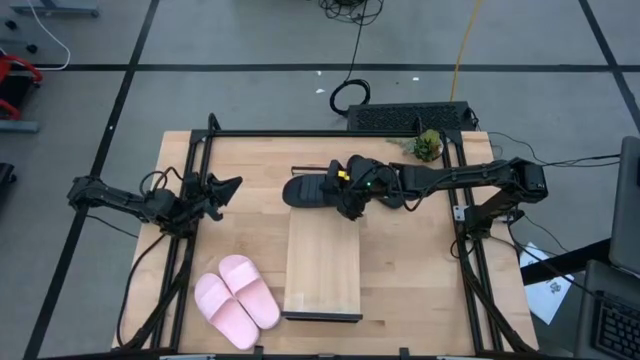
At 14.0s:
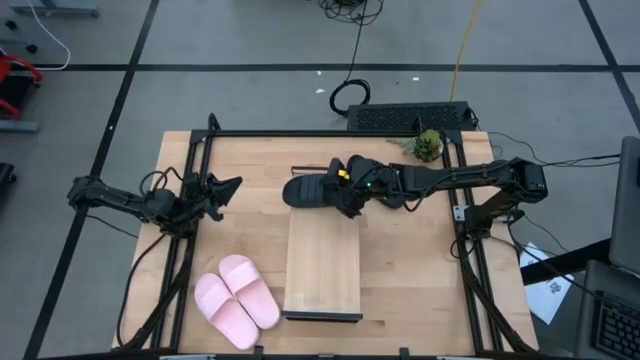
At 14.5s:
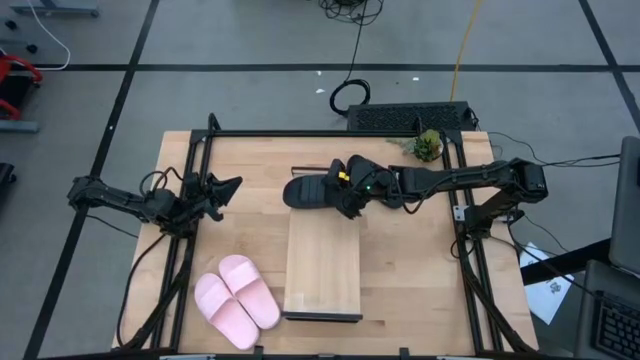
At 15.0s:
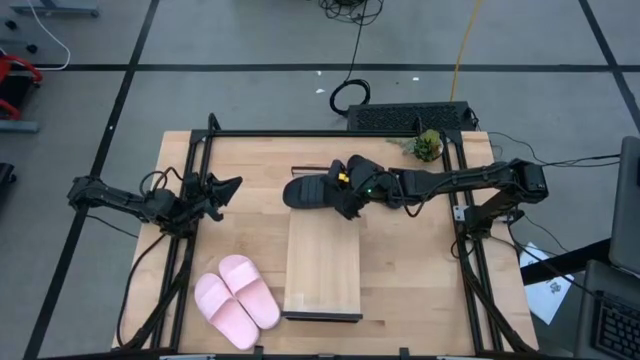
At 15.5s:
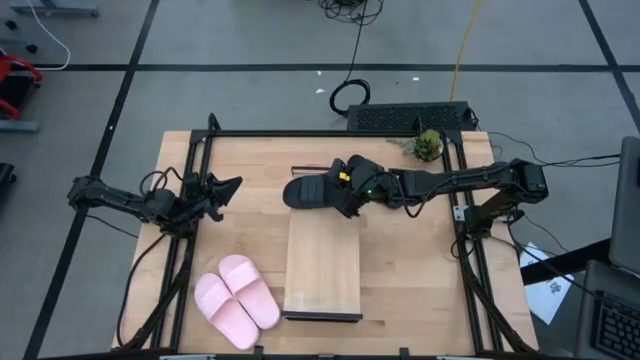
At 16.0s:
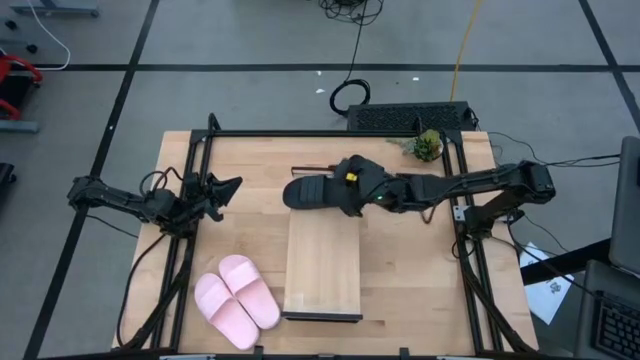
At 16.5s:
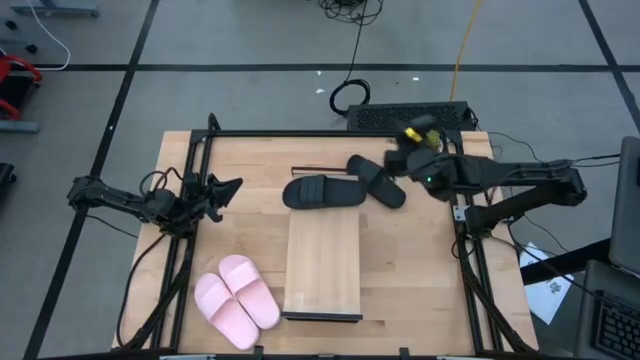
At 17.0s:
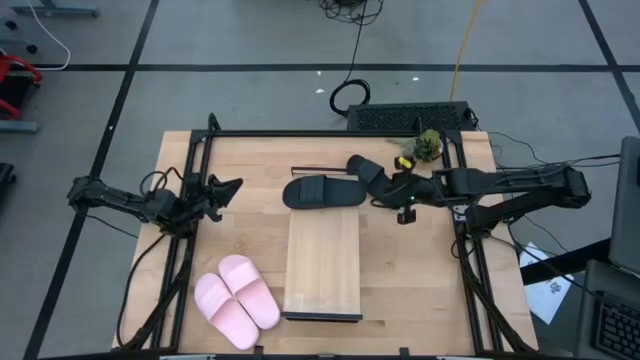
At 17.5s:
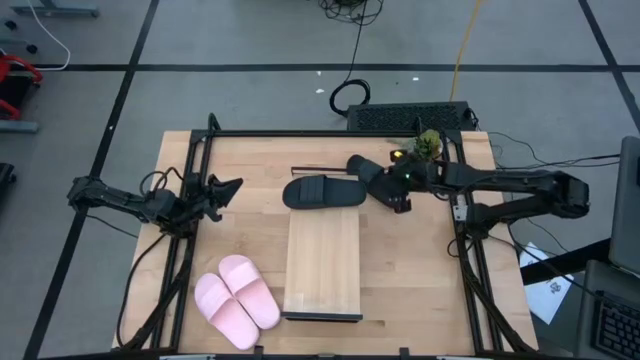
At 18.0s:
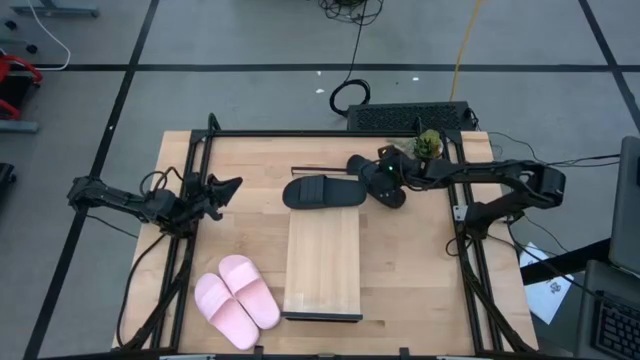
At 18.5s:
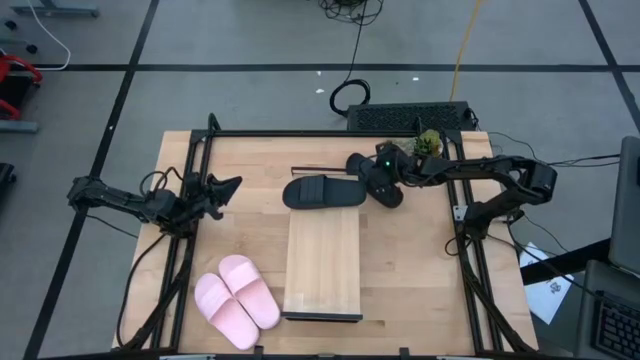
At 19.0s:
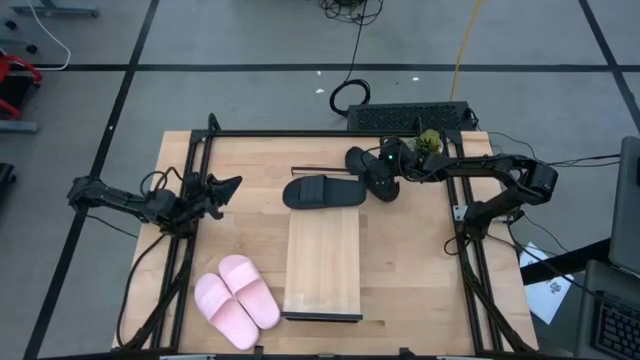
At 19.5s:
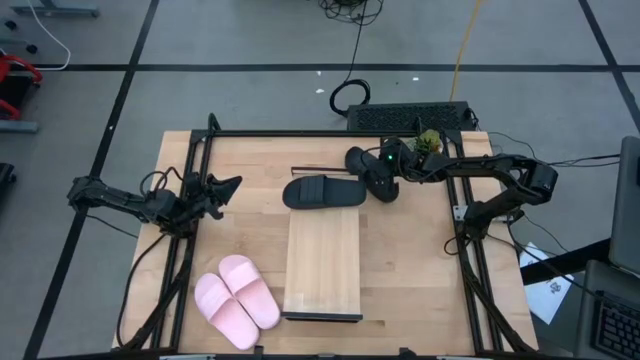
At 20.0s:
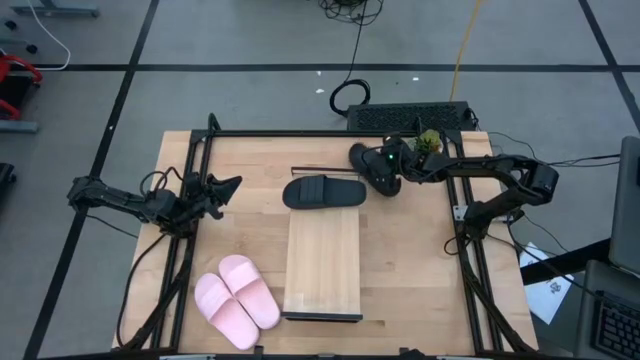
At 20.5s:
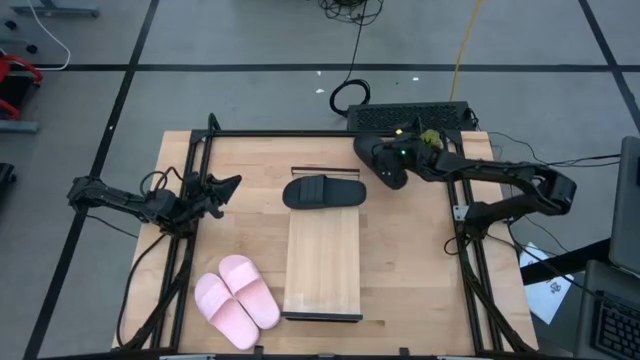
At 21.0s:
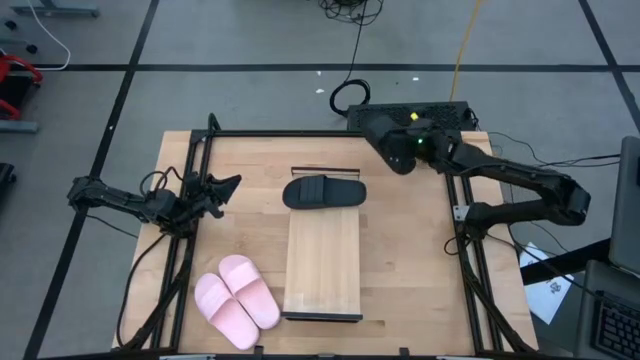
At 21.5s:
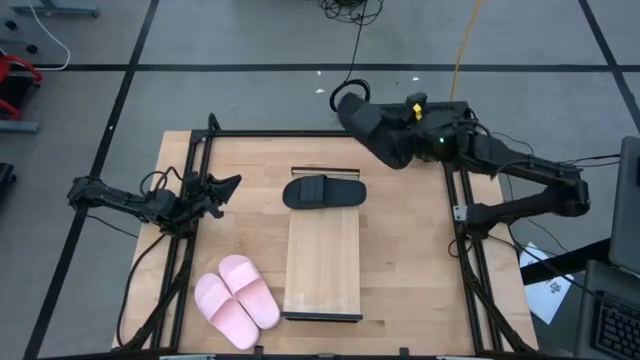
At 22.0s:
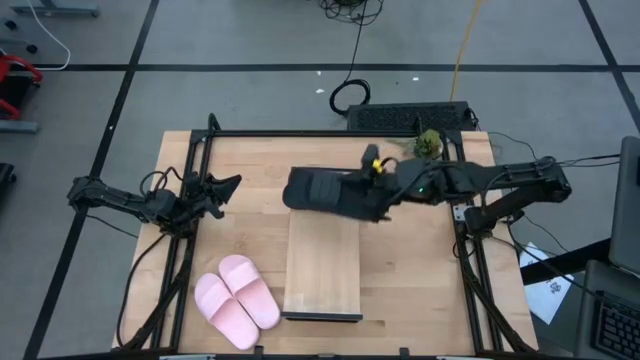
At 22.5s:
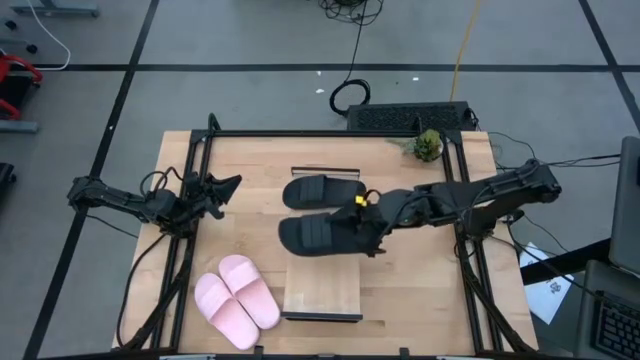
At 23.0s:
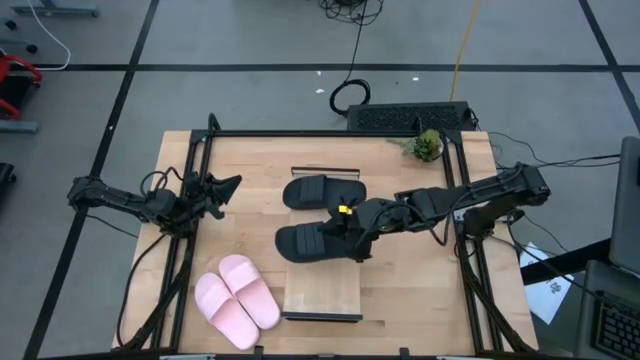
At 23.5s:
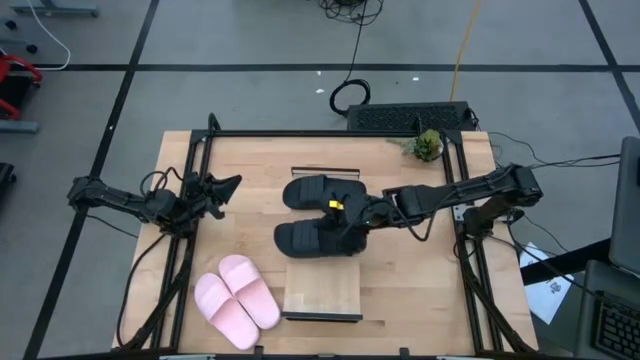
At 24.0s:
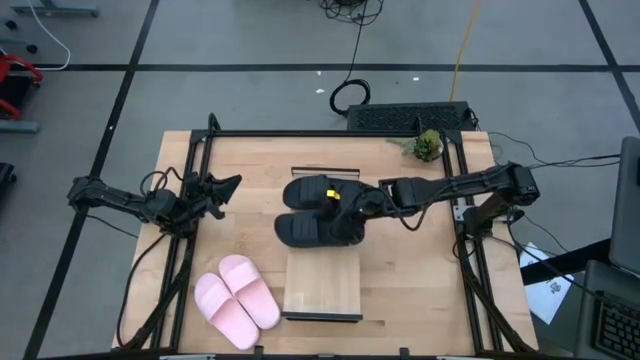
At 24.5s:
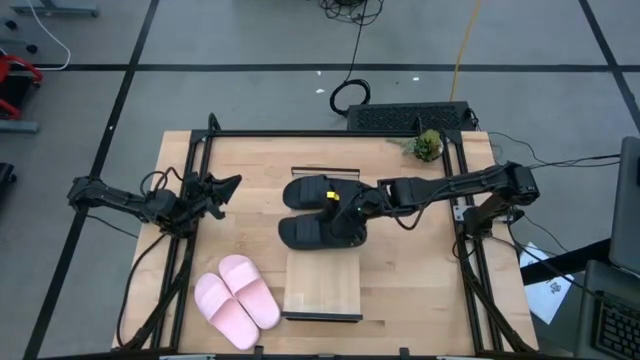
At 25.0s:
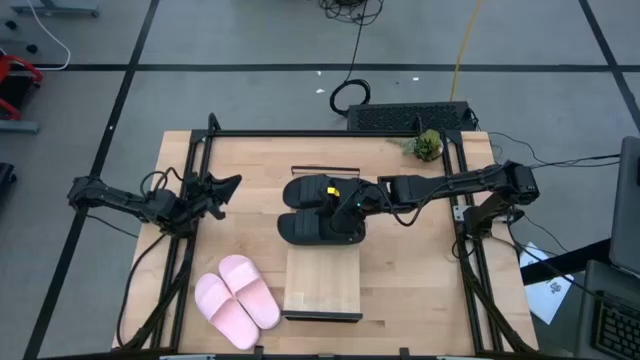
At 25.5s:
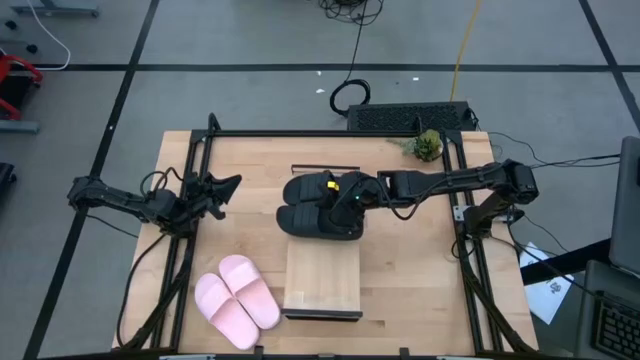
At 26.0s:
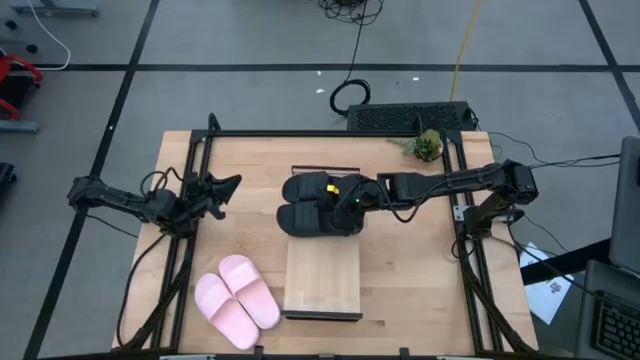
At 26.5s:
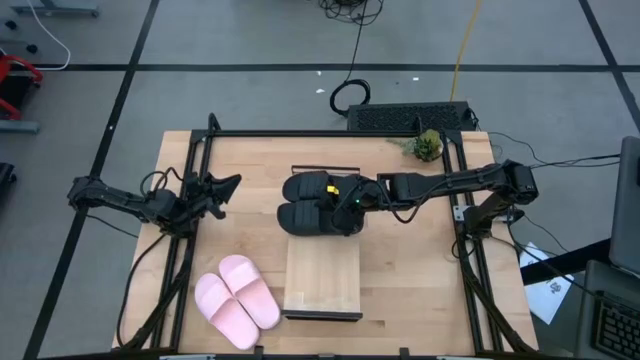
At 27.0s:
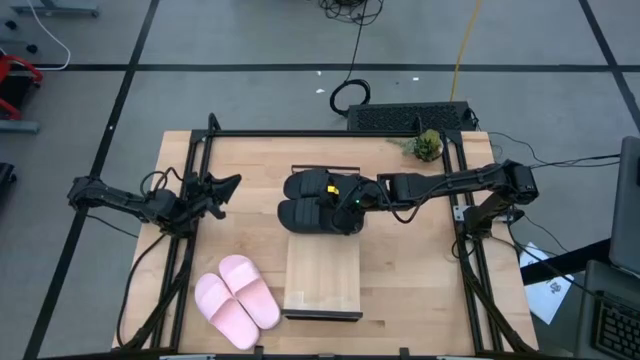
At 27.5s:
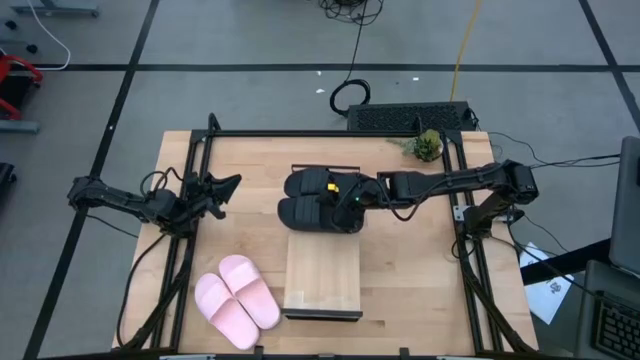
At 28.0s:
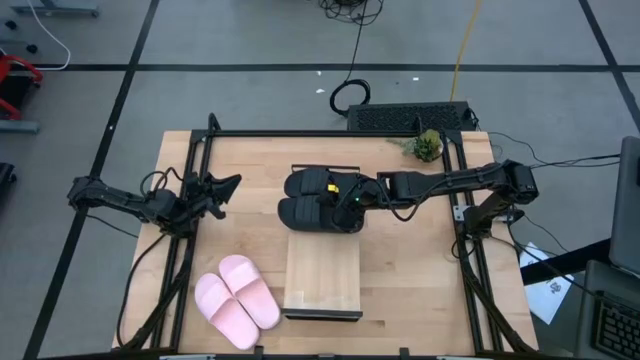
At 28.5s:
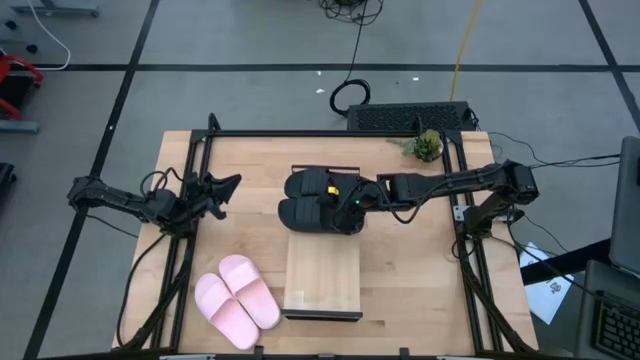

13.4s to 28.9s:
Task: Pick and place slides into the shelf
Put the black slide on the shelf

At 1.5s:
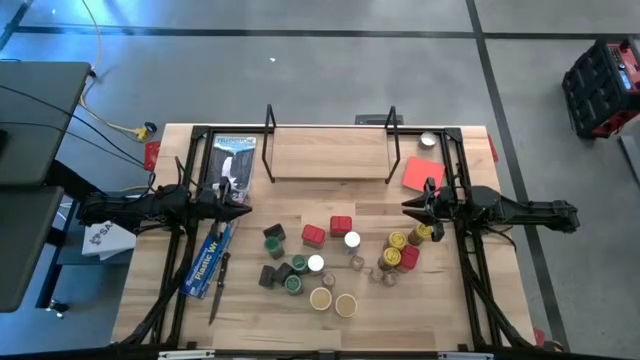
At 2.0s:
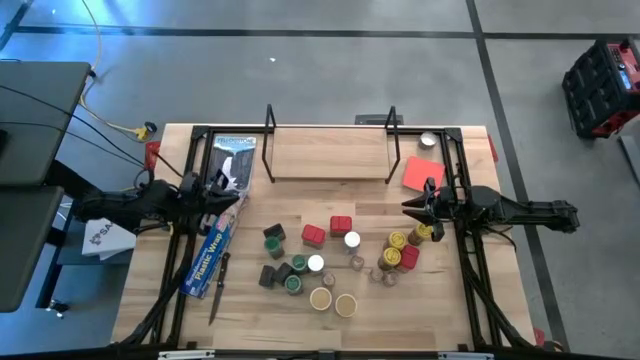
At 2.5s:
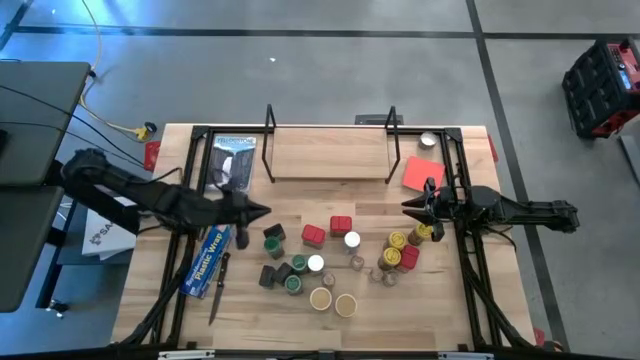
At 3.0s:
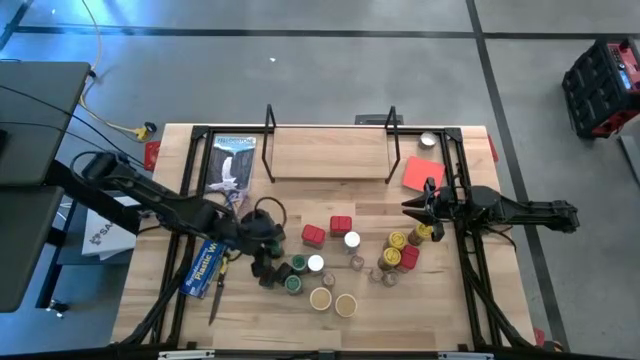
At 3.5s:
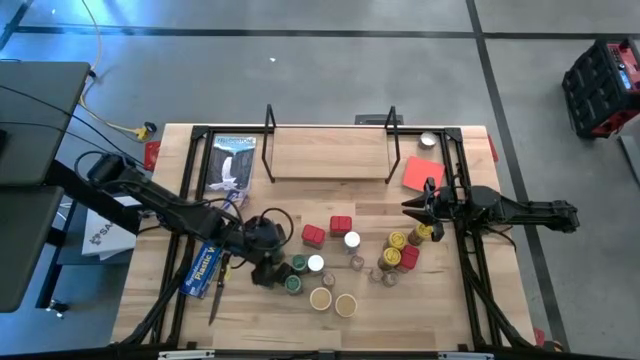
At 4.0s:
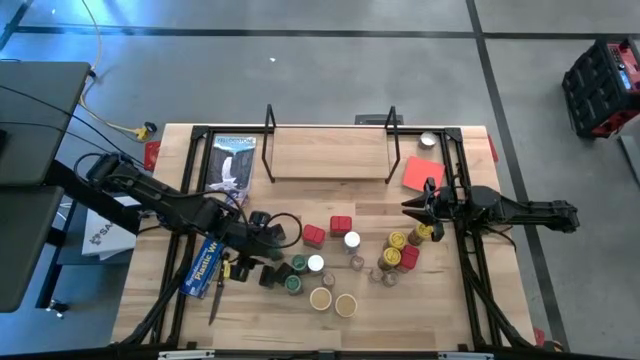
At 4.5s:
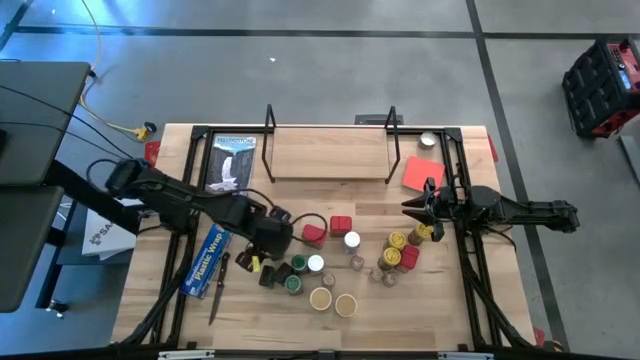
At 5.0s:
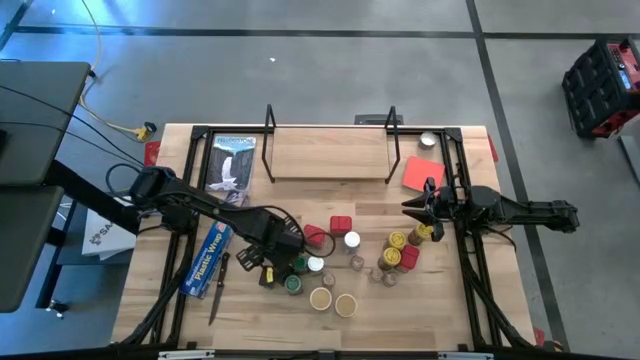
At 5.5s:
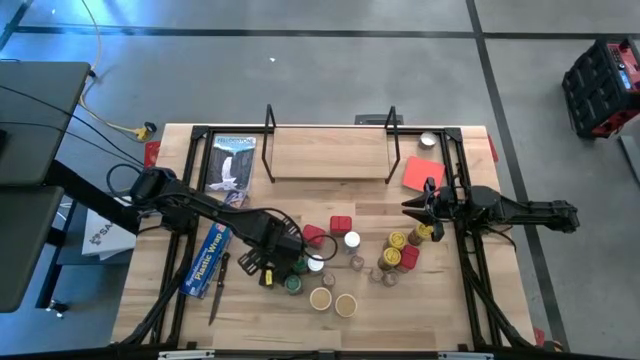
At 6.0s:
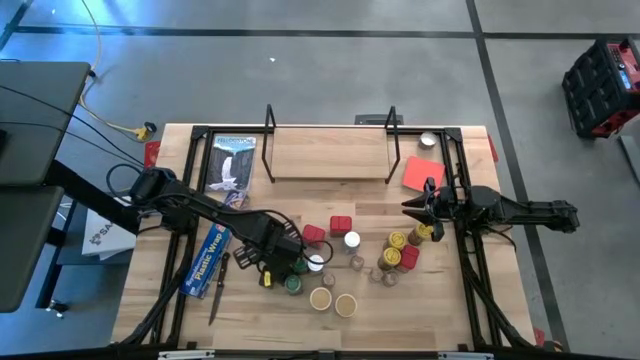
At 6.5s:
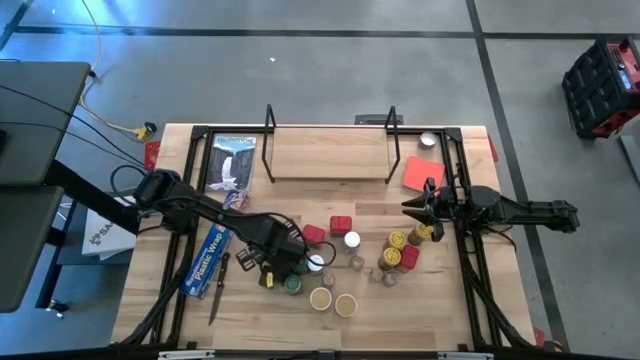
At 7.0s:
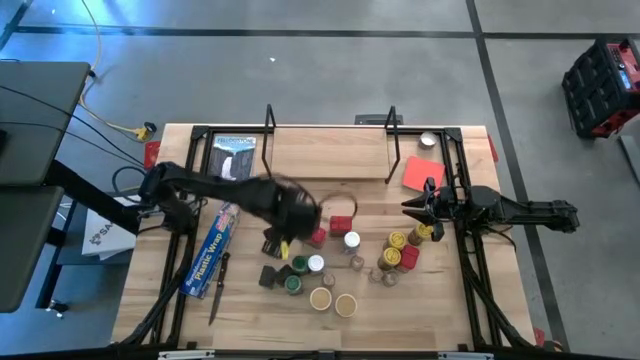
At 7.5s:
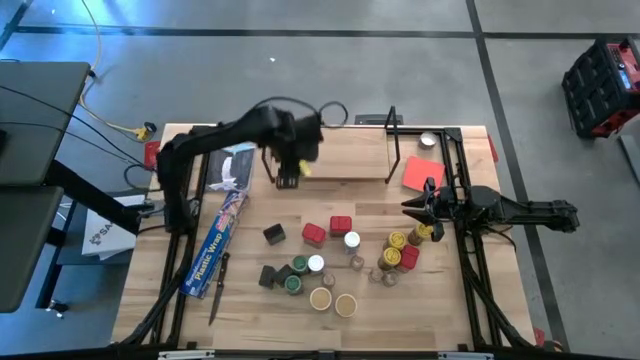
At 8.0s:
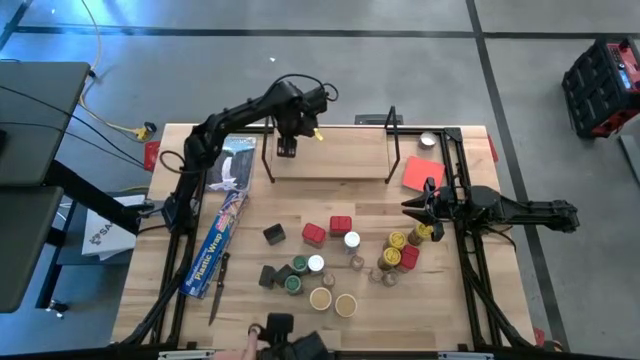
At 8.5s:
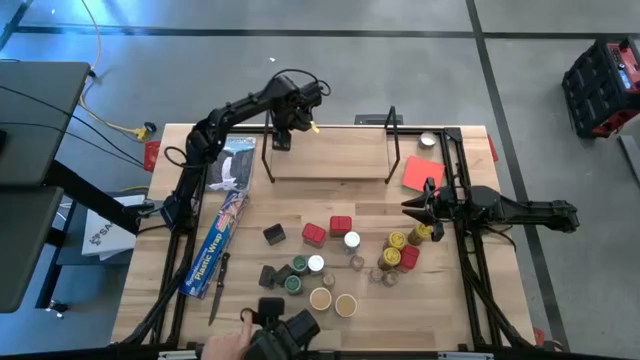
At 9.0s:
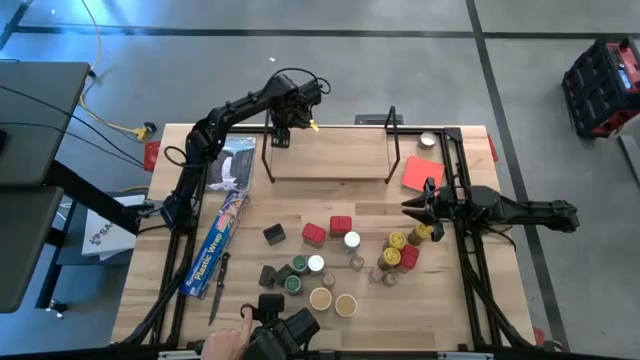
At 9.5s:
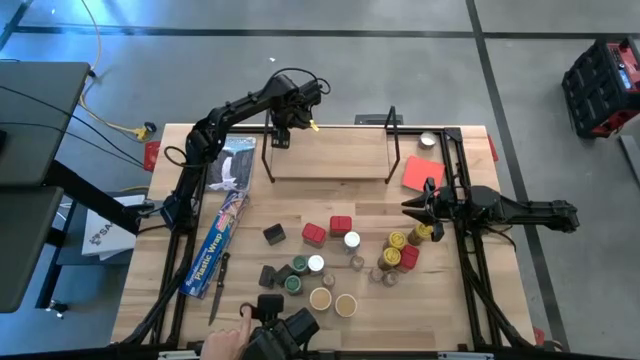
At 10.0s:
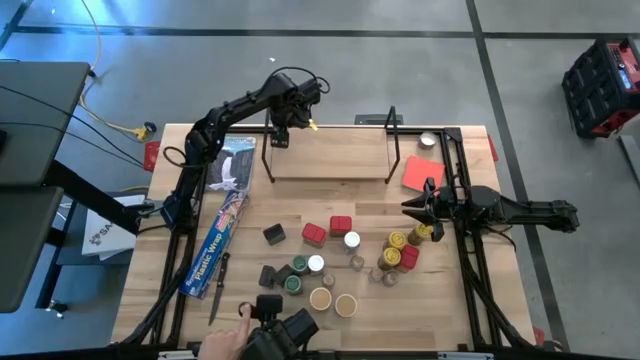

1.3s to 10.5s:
Task: Shelf spices
Put the green seasoning bottle on the shelf
